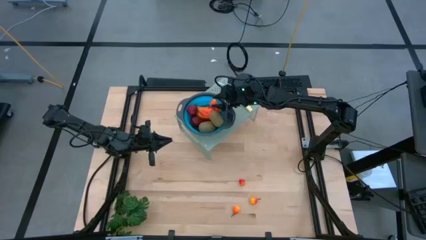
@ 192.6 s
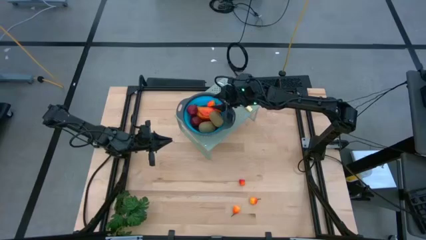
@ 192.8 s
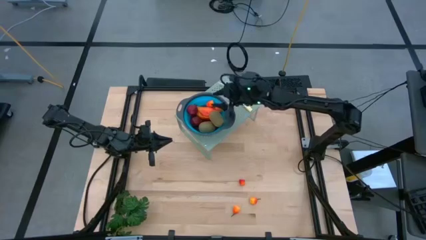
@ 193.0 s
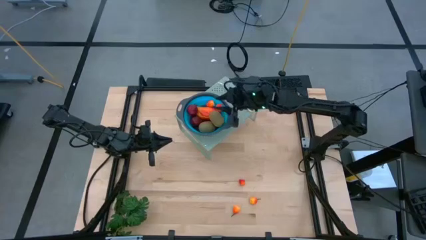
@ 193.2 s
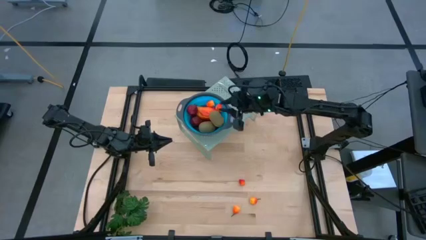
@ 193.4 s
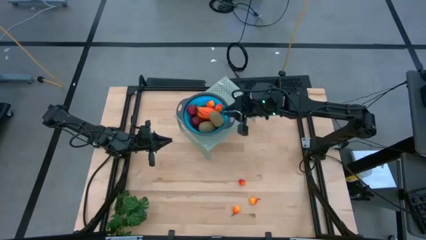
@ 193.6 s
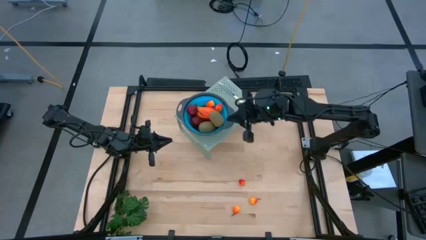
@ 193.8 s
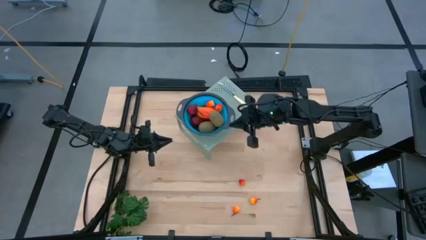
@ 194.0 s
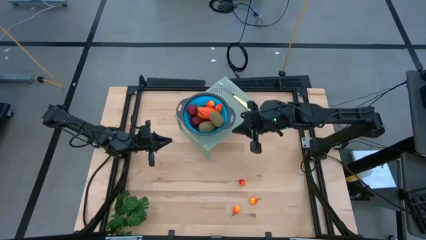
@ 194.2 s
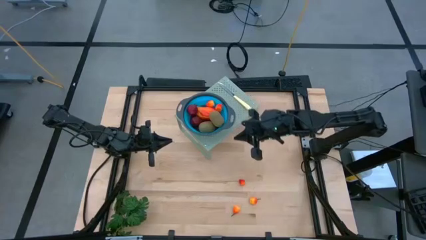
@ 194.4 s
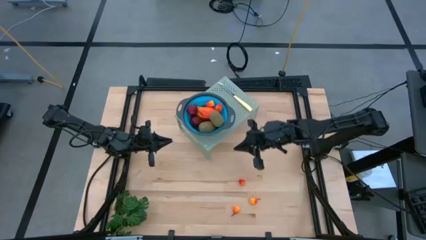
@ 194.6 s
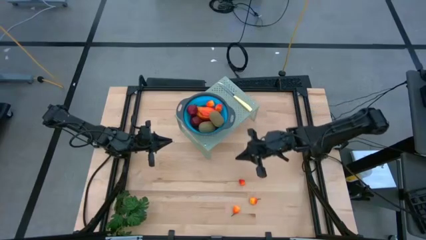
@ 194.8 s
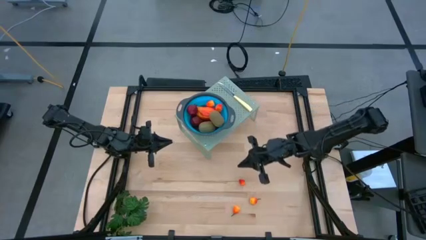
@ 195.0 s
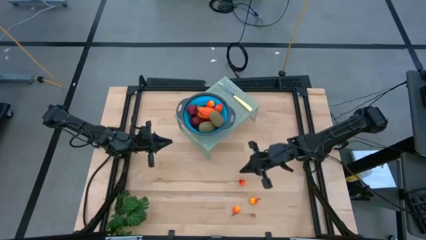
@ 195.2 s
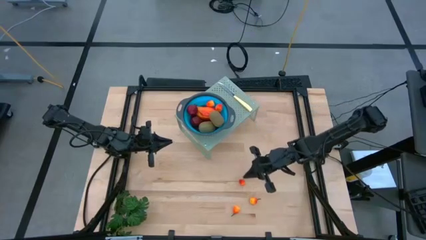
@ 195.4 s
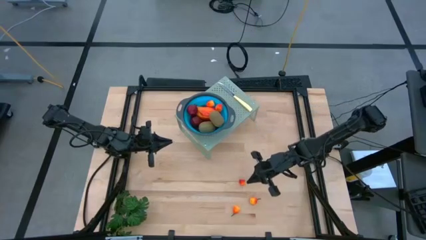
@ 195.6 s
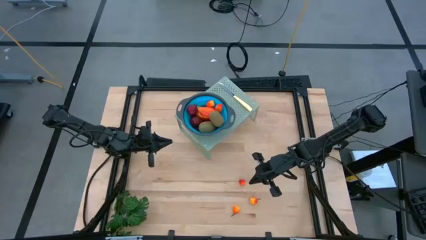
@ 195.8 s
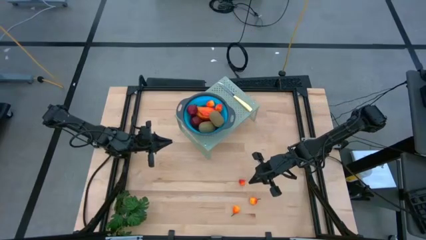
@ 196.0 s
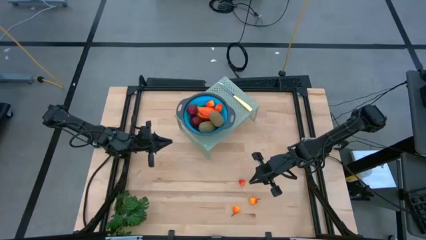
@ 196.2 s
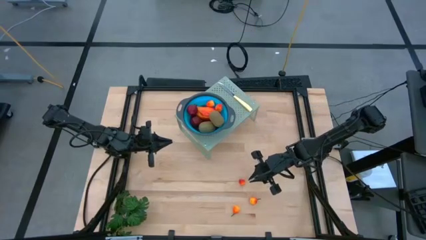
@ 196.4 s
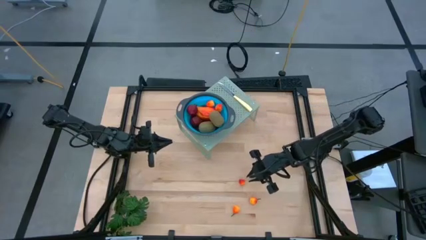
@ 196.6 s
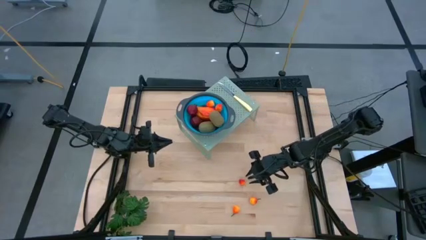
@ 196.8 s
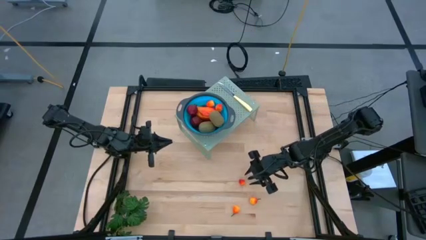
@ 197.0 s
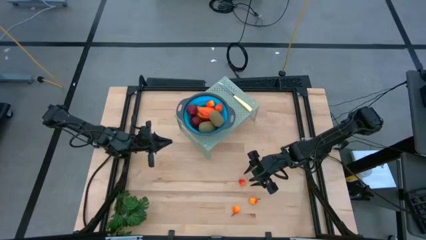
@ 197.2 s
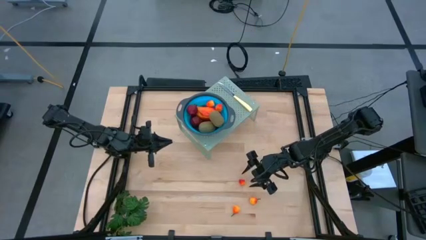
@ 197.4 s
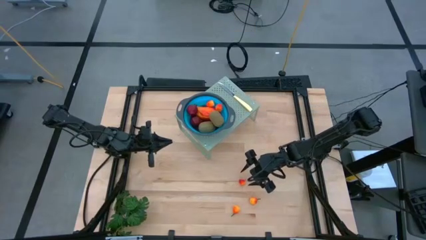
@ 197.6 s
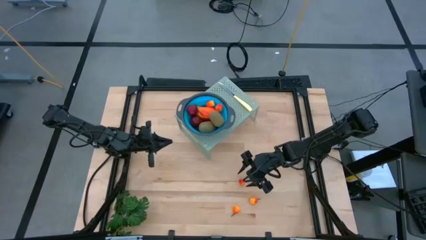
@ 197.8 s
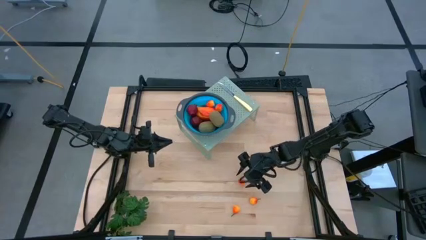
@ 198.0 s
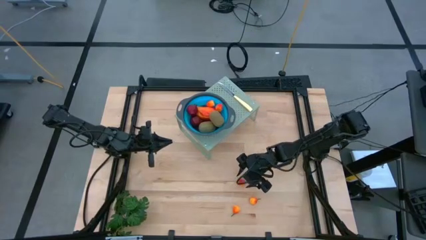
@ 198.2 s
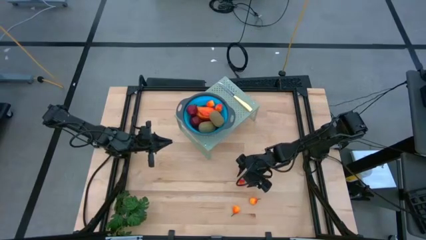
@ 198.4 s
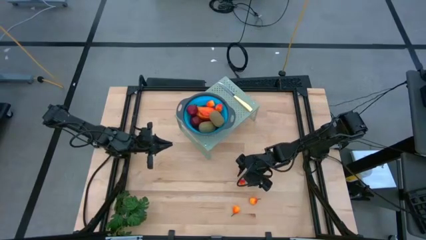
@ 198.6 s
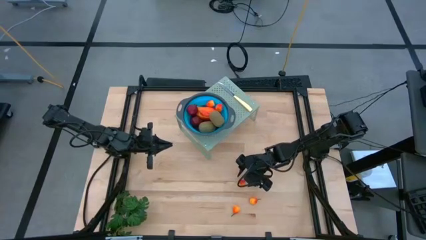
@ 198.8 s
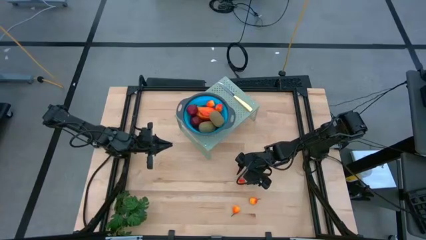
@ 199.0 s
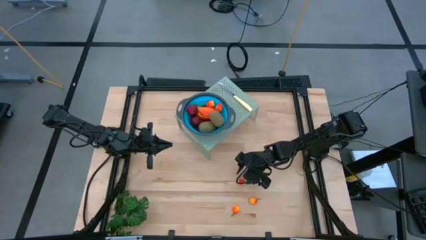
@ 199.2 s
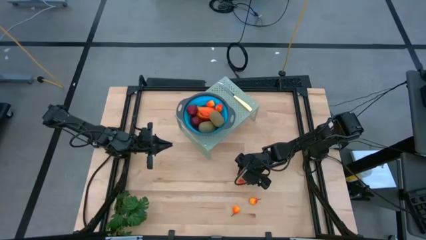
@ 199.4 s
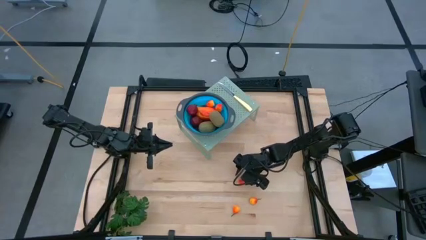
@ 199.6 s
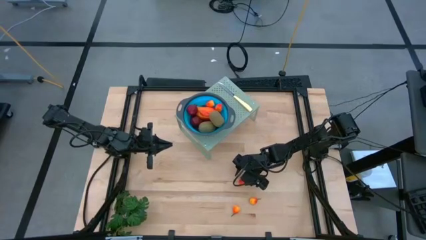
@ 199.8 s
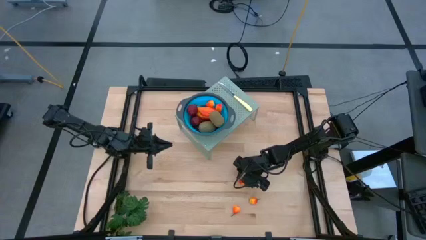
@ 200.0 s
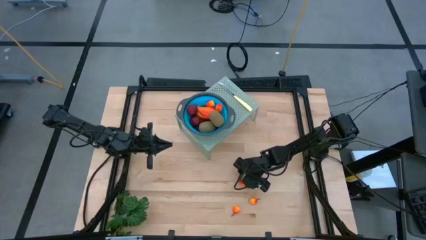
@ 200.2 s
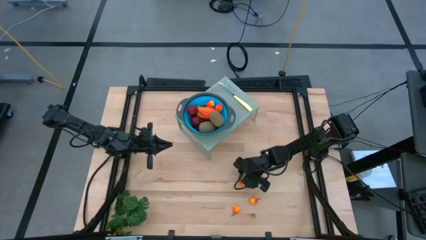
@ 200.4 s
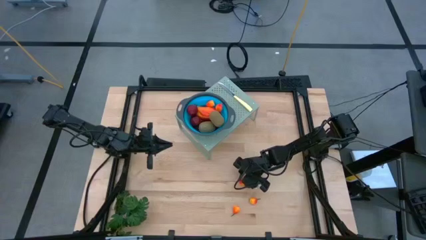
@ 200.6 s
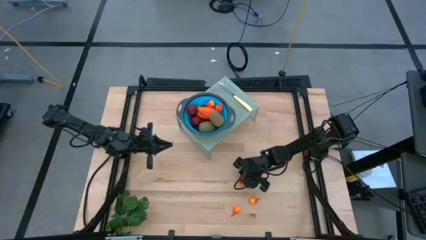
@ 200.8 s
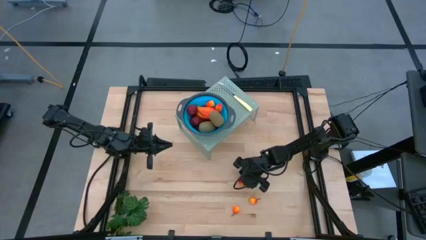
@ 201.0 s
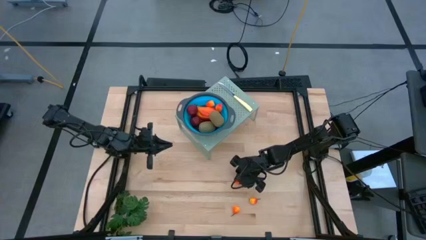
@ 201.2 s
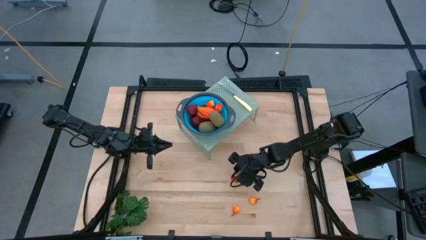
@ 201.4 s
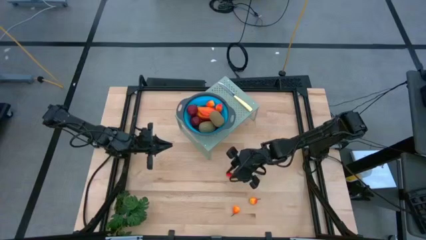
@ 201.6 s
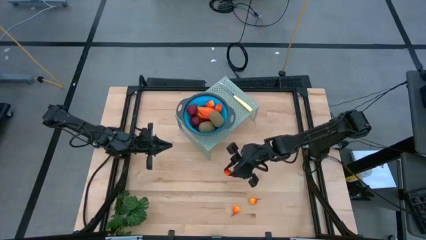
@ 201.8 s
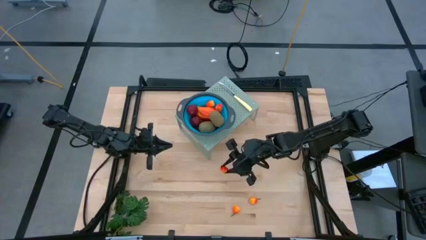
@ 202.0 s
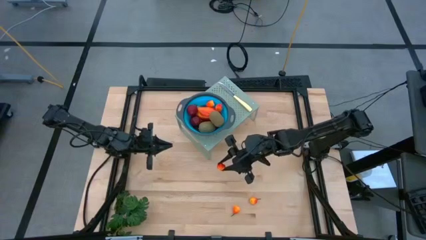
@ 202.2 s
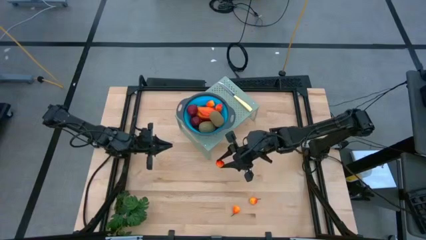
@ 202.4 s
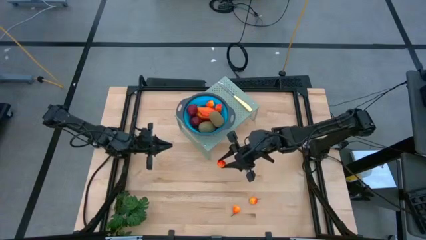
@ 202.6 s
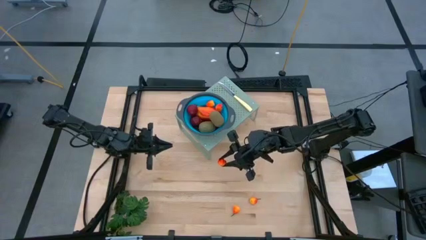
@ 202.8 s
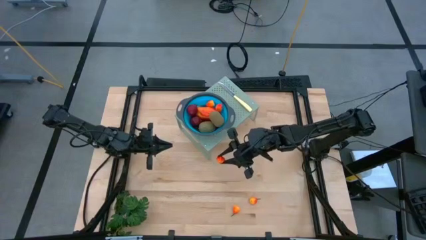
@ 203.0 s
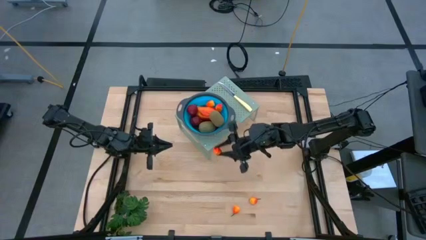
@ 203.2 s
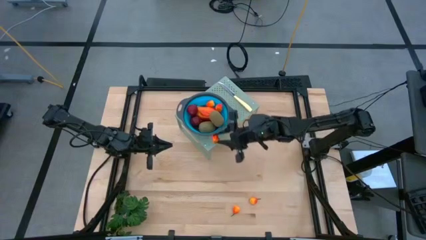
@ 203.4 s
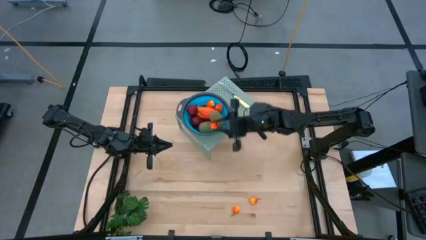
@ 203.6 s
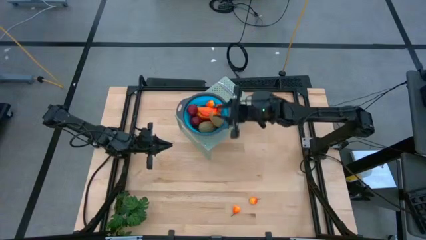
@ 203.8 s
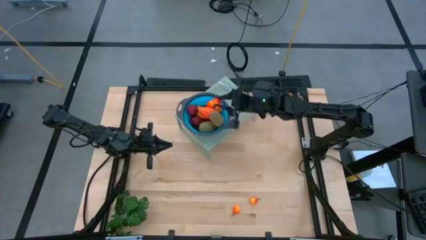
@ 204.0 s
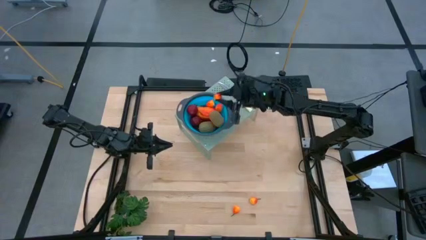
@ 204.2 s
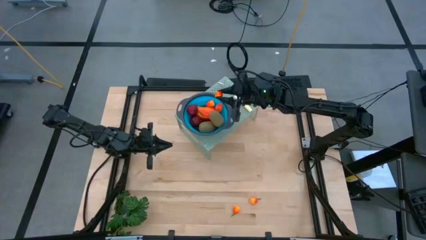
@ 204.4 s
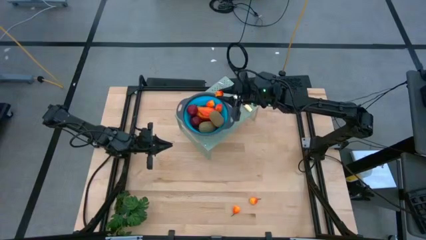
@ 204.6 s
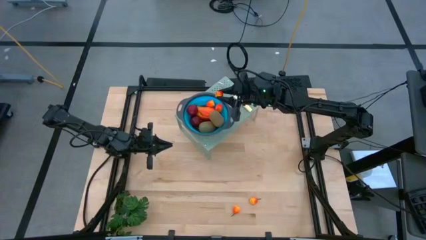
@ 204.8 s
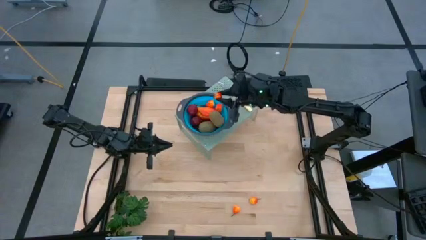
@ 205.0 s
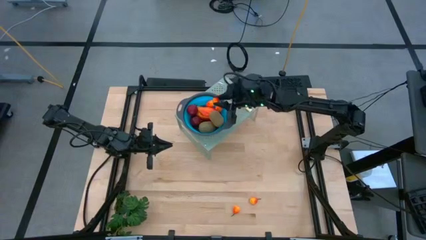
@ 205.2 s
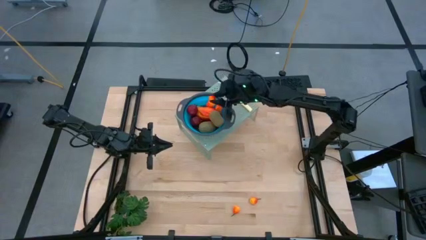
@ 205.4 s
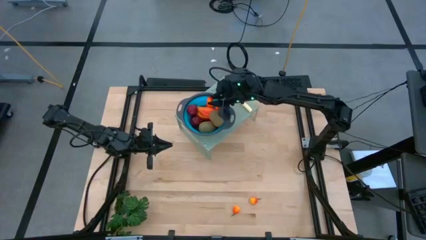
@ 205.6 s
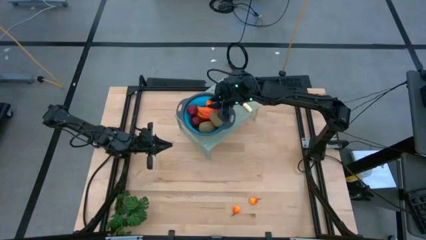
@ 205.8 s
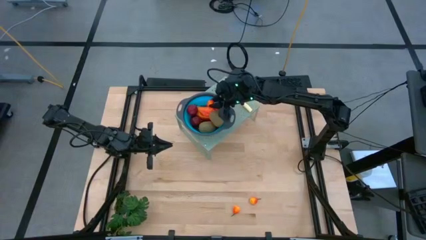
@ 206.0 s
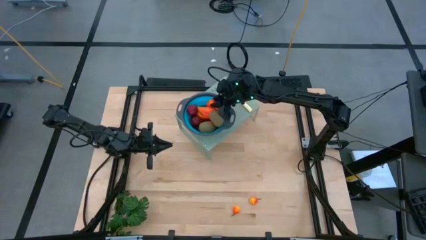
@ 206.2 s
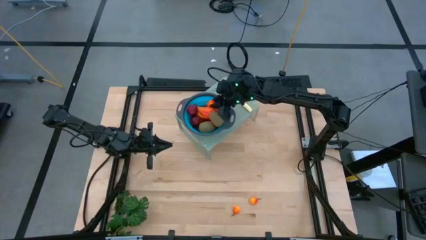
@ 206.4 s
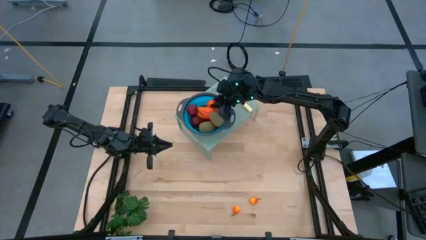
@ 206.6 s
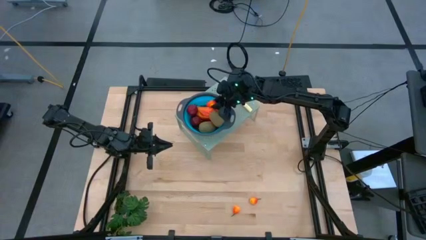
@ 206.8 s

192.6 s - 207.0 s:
Task: Pick & Place Fruit
Put the peach into the collapsible colander on the shelf
